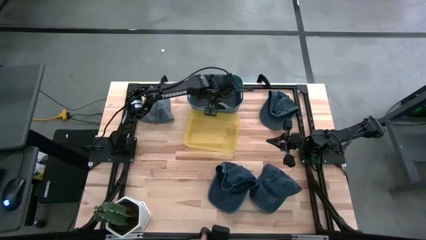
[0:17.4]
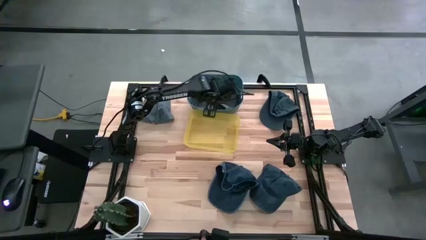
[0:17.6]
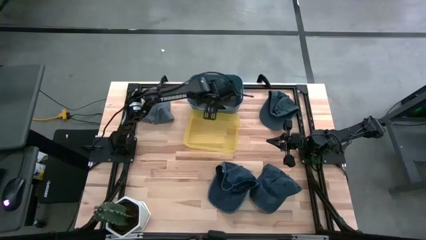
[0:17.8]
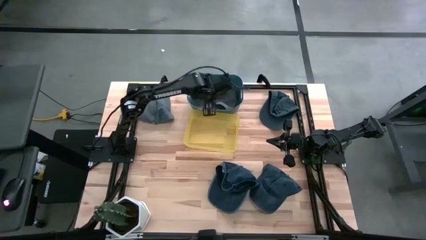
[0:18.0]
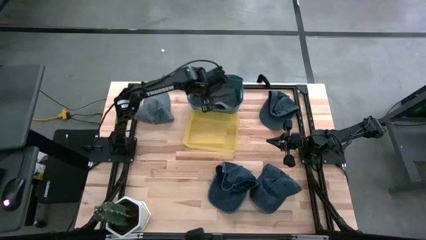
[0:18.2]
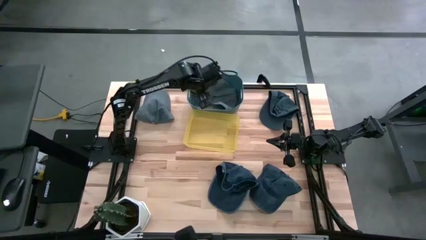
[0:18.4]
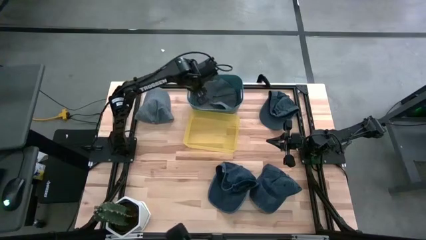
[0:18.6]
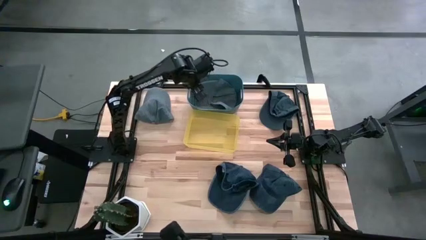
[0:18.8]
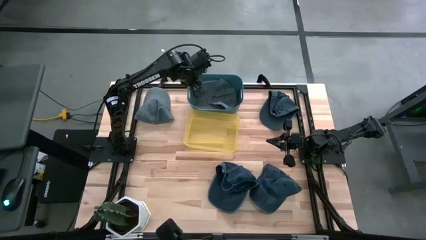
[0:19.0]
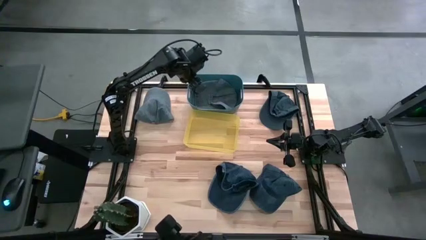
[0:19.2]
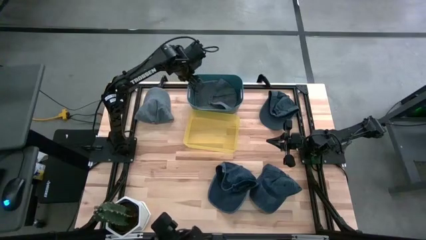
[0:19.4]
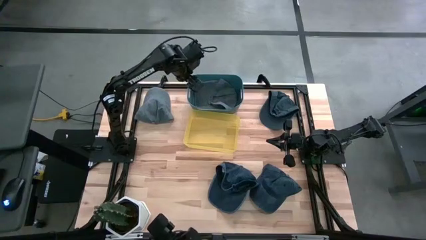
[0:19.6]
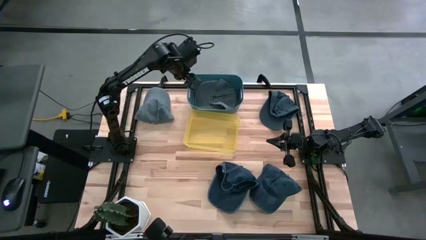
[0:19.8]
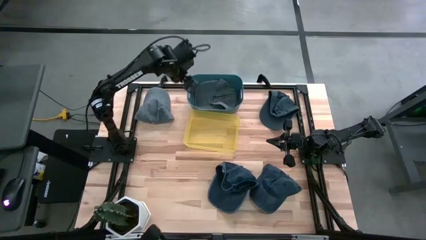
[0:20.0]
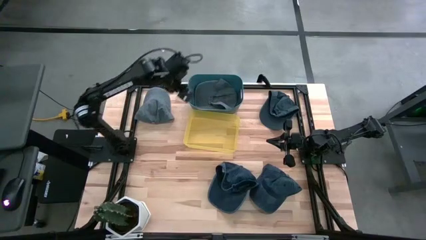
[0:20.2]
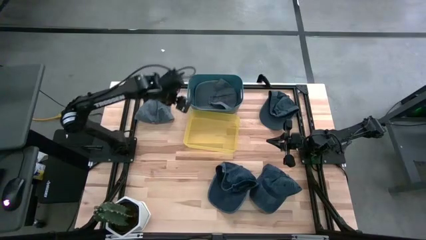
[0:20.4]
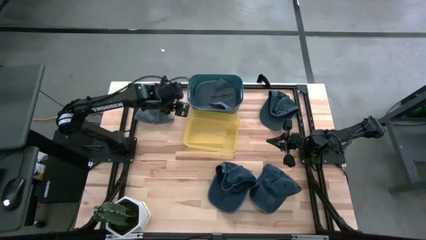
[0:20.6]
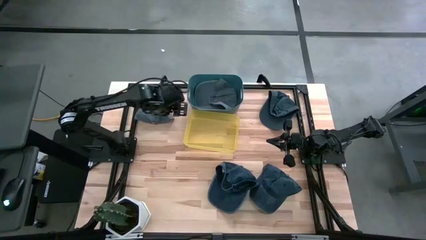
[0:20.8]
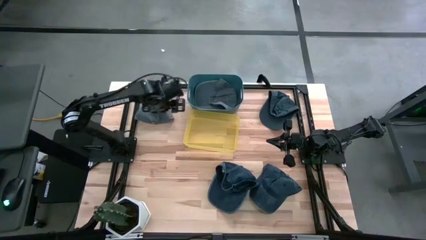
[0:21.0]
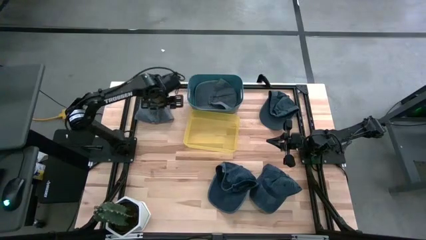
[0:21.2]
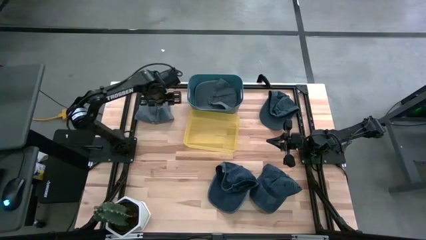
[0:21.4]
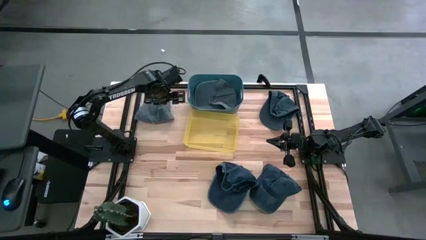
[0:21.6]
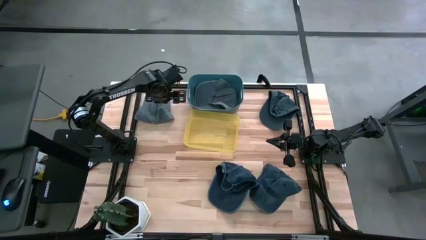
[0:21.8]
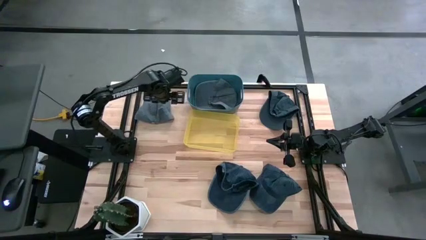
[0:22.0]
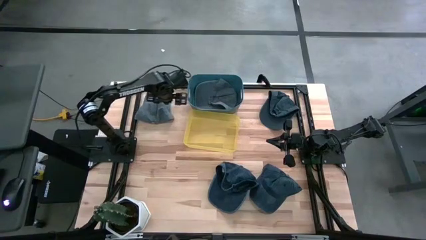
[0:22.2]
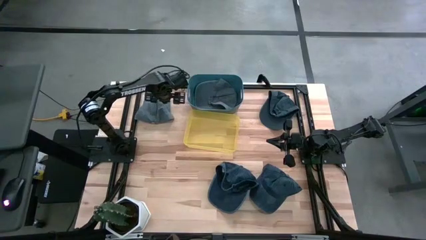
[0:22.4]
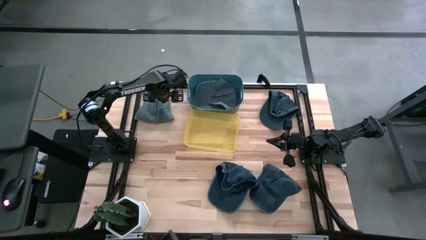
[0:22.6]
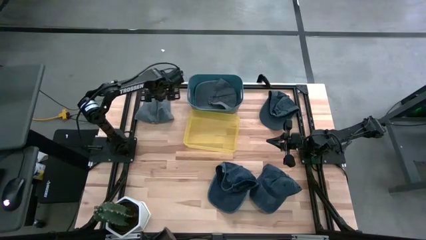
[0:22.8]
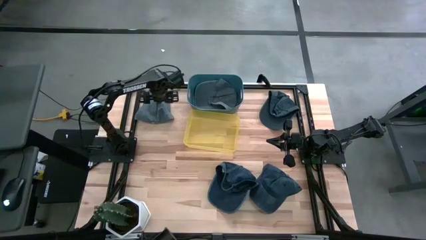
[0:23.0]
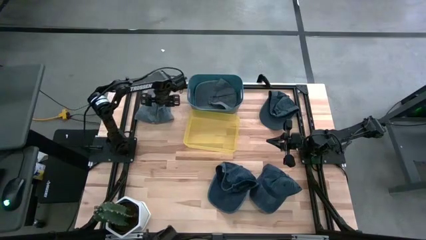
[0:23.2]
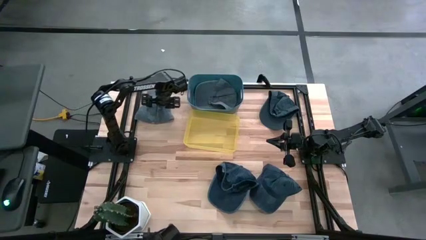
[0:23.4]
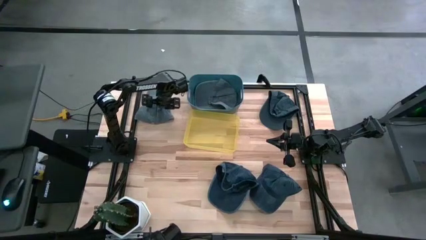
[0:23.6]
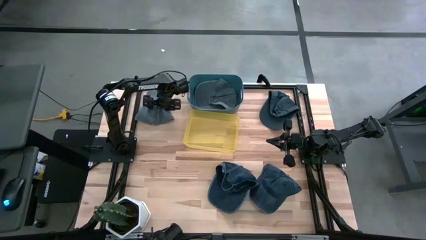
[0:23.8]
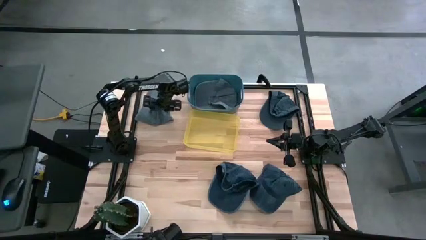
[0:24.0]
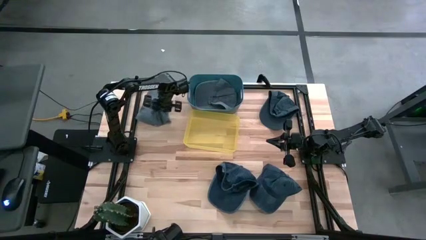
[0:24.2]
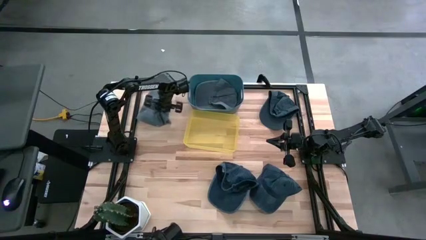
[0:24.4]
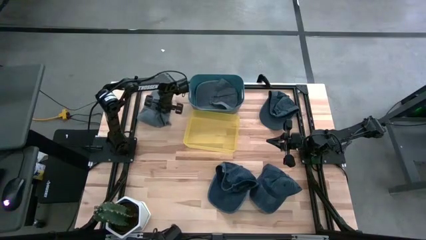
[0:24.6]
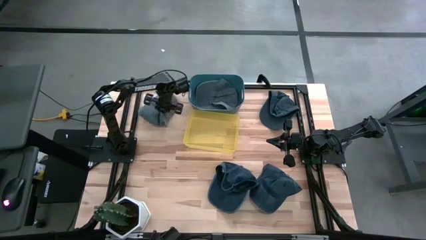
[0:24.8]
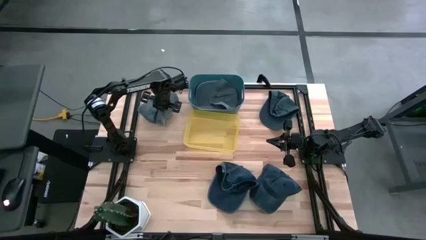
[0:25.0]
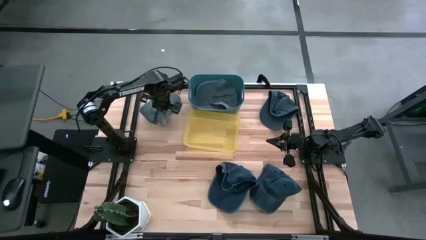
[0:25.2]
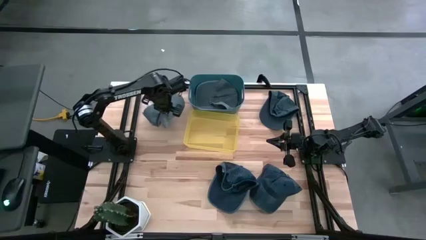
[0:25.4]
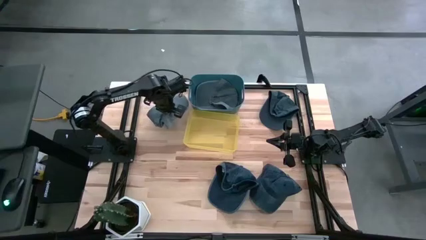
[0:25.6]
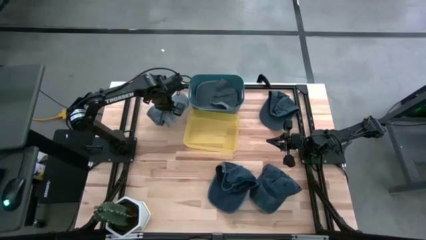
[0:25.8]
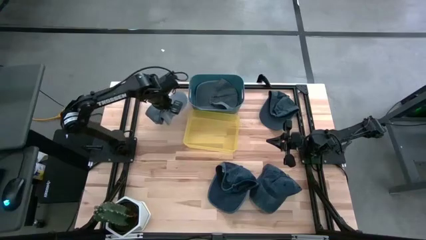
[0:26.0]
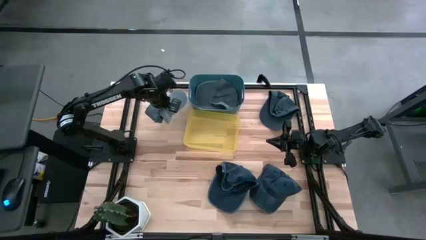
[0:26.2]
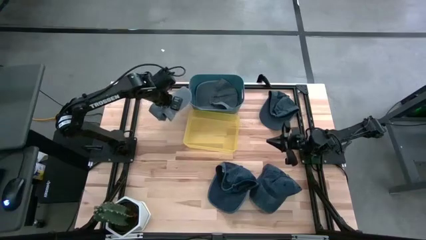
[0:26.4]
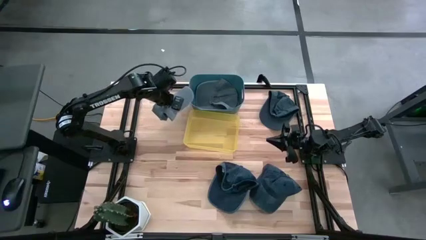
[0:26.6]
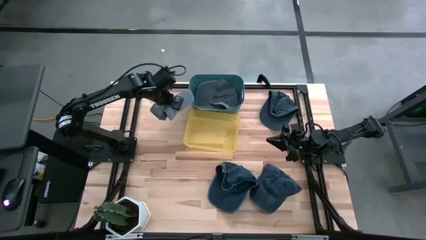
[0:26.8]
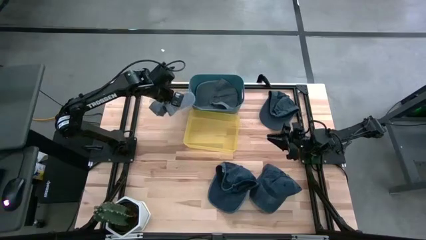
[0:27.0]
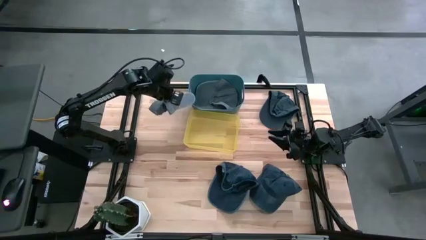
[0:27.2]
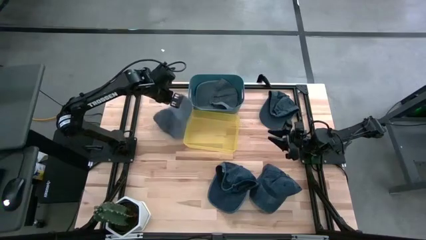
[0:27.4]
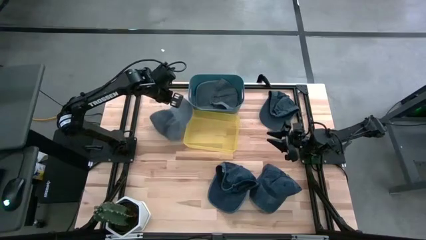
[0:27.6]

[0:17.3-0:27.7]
Task: Pick & Place hat
Put the gray cap into the blue bin
